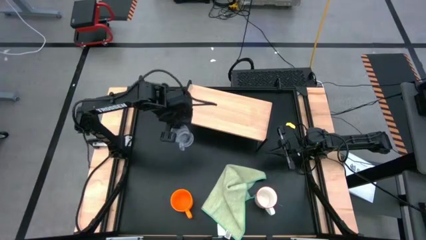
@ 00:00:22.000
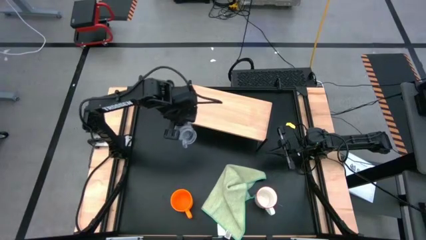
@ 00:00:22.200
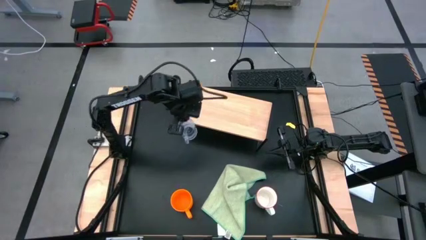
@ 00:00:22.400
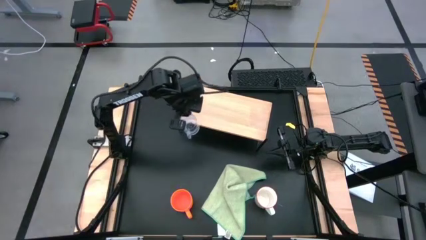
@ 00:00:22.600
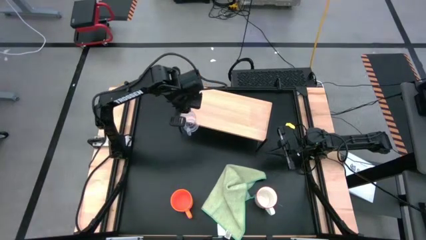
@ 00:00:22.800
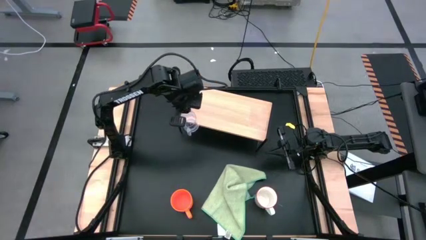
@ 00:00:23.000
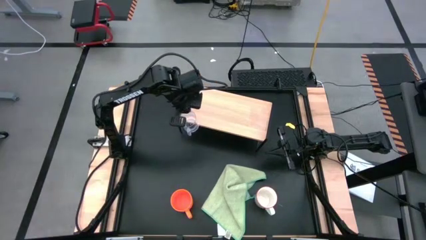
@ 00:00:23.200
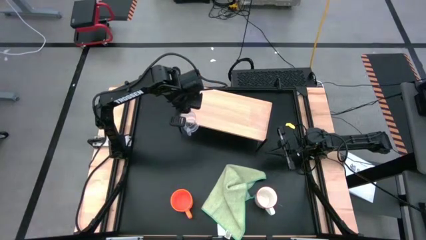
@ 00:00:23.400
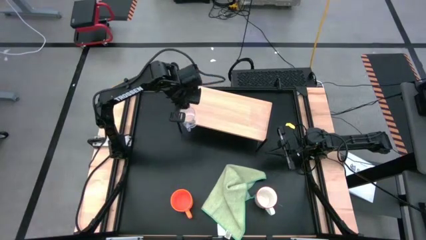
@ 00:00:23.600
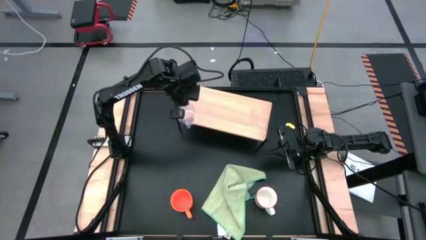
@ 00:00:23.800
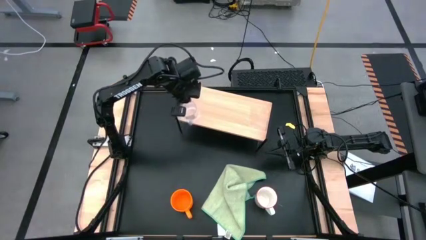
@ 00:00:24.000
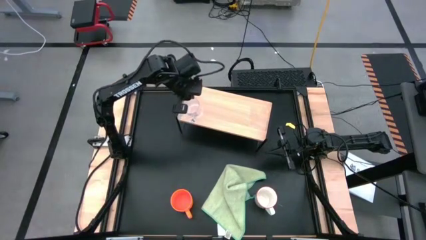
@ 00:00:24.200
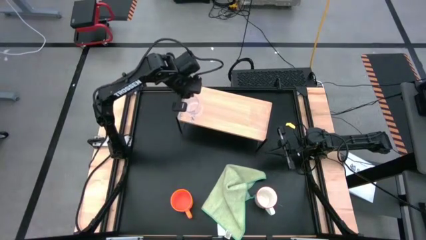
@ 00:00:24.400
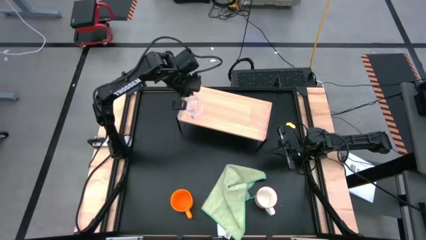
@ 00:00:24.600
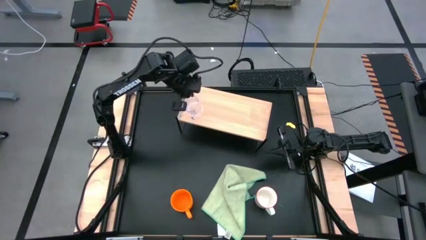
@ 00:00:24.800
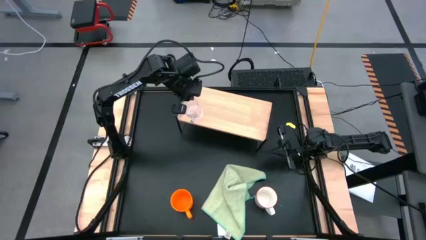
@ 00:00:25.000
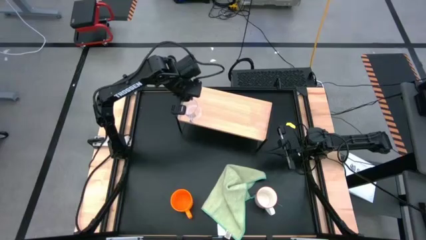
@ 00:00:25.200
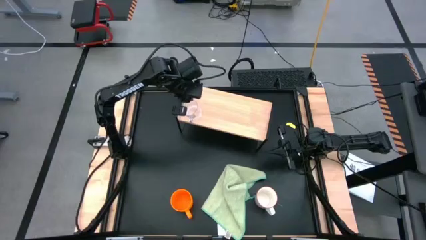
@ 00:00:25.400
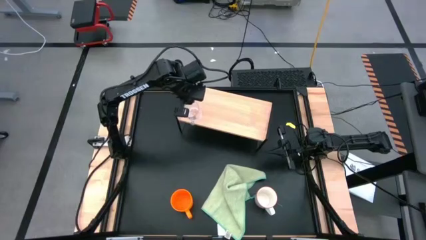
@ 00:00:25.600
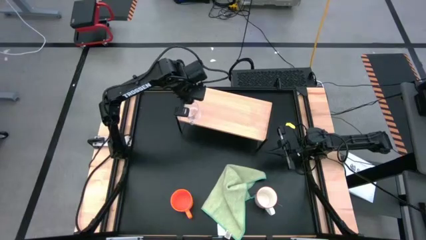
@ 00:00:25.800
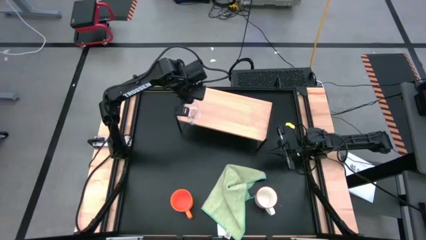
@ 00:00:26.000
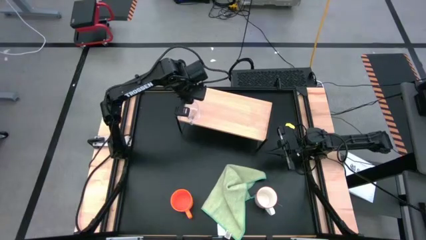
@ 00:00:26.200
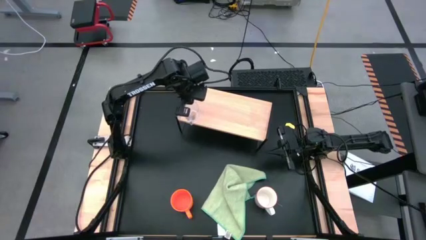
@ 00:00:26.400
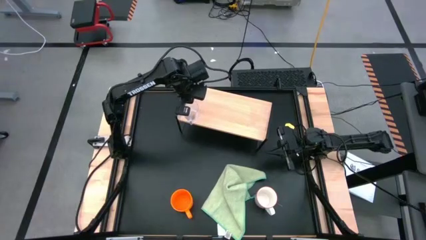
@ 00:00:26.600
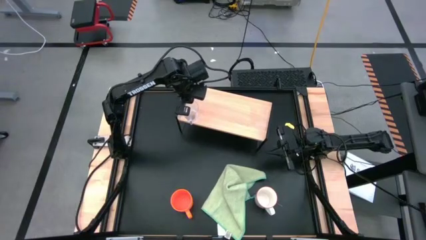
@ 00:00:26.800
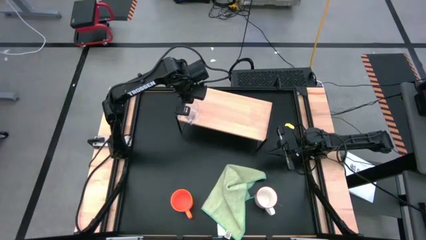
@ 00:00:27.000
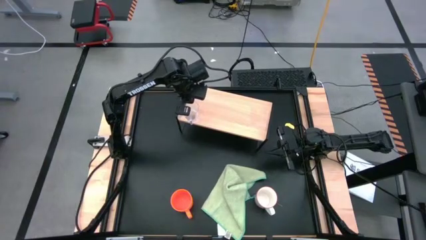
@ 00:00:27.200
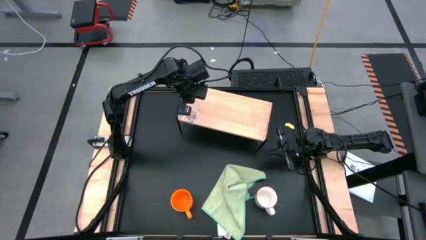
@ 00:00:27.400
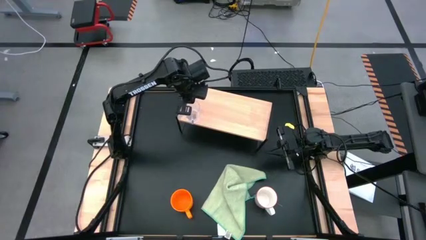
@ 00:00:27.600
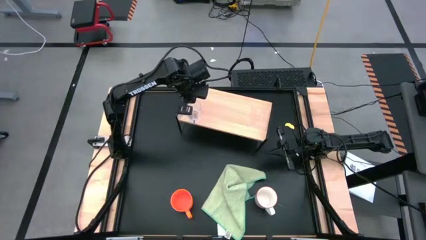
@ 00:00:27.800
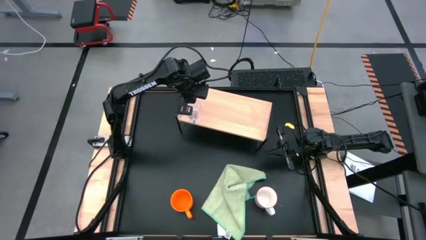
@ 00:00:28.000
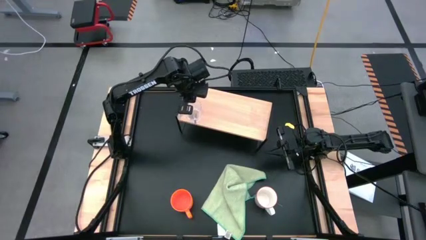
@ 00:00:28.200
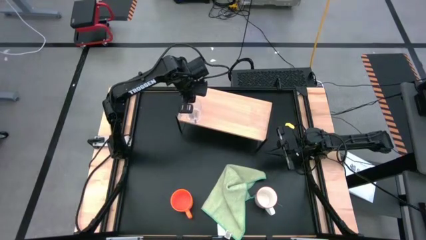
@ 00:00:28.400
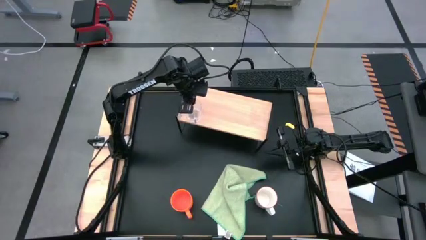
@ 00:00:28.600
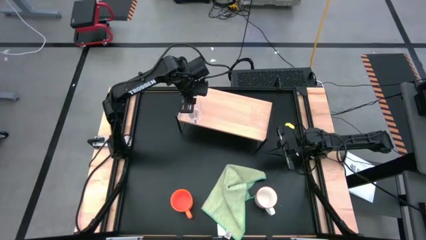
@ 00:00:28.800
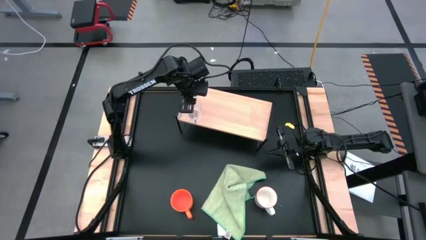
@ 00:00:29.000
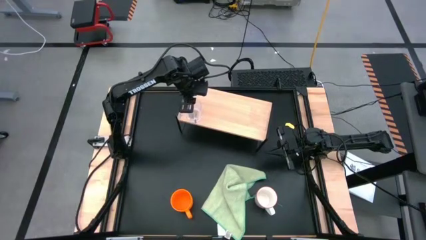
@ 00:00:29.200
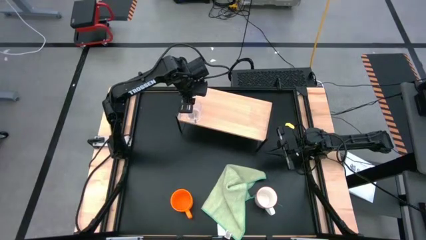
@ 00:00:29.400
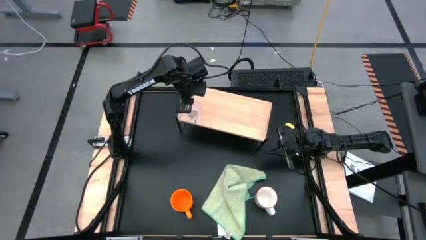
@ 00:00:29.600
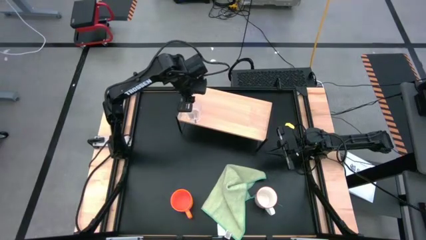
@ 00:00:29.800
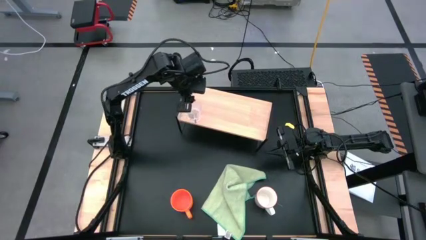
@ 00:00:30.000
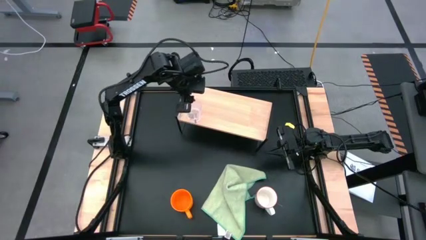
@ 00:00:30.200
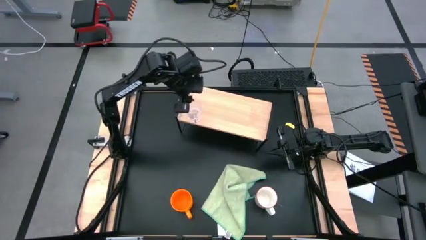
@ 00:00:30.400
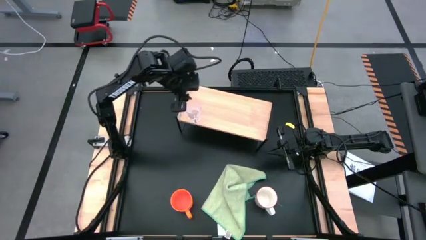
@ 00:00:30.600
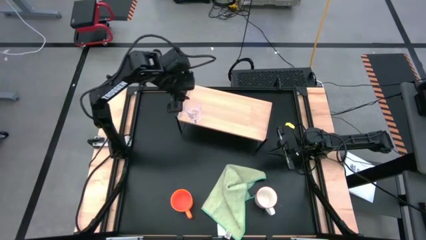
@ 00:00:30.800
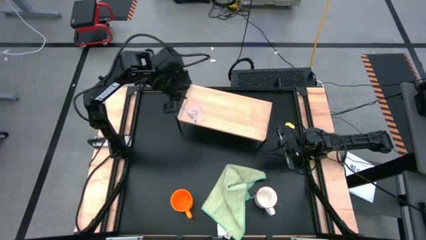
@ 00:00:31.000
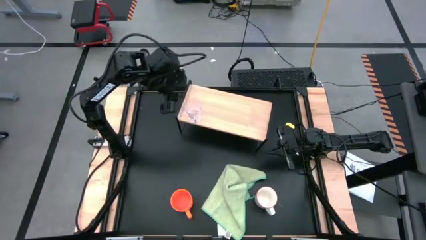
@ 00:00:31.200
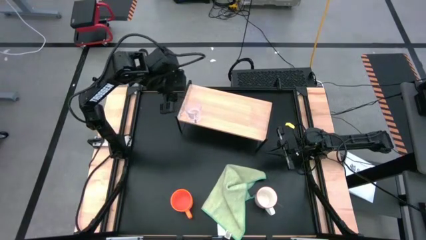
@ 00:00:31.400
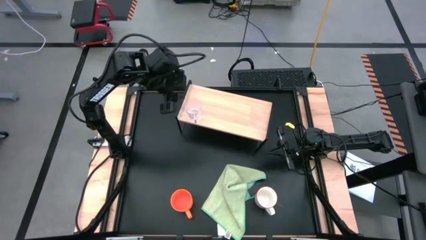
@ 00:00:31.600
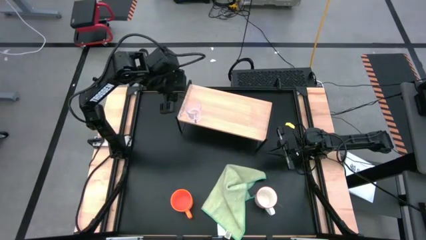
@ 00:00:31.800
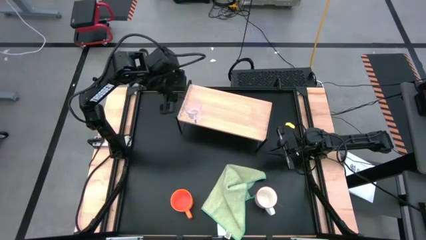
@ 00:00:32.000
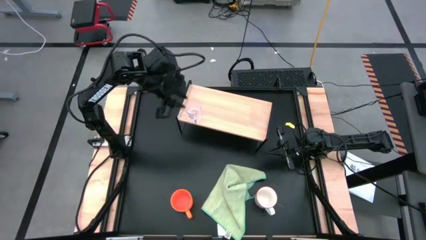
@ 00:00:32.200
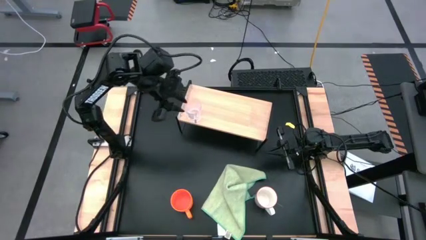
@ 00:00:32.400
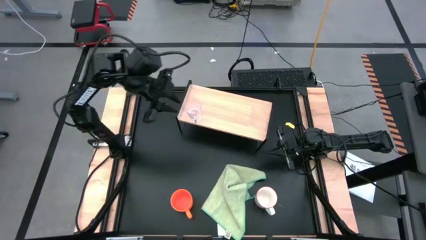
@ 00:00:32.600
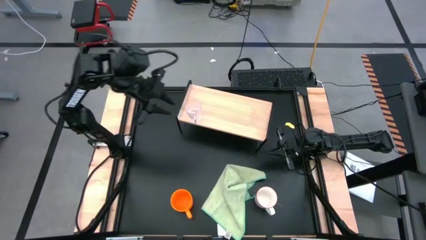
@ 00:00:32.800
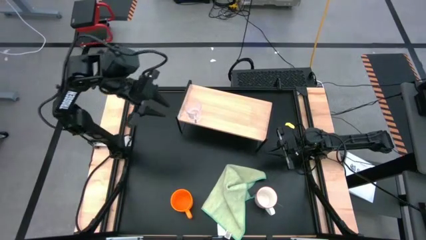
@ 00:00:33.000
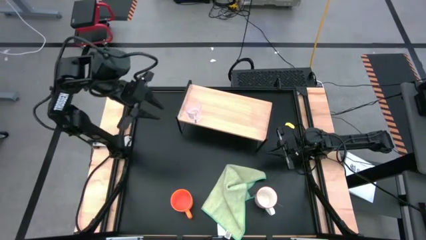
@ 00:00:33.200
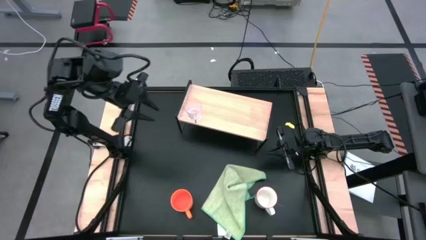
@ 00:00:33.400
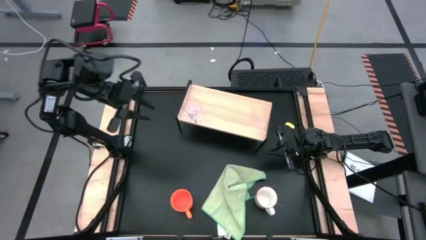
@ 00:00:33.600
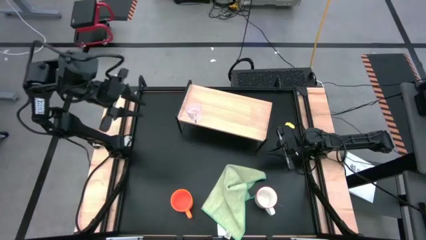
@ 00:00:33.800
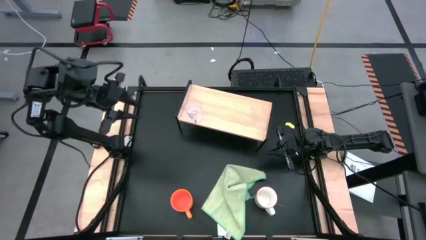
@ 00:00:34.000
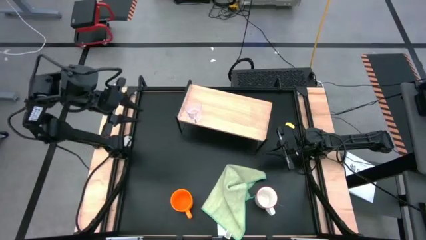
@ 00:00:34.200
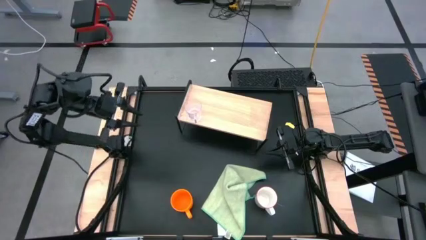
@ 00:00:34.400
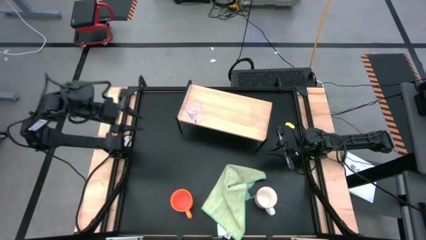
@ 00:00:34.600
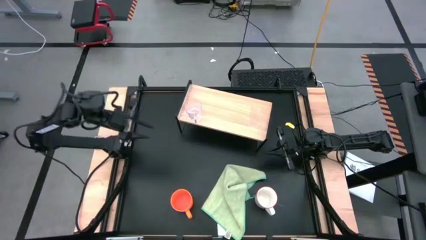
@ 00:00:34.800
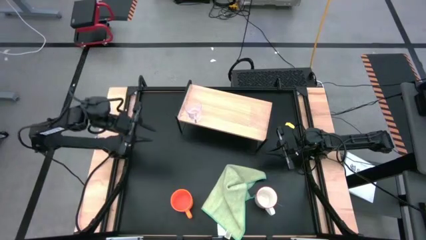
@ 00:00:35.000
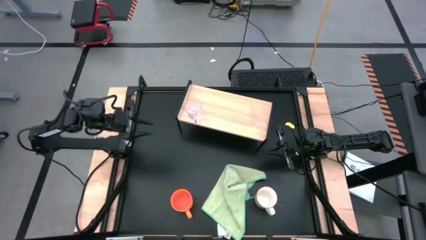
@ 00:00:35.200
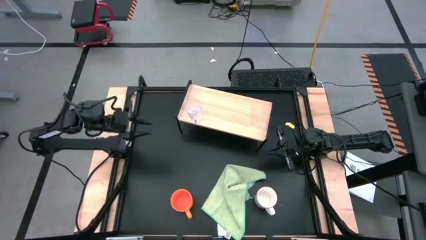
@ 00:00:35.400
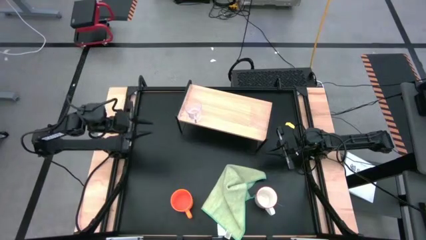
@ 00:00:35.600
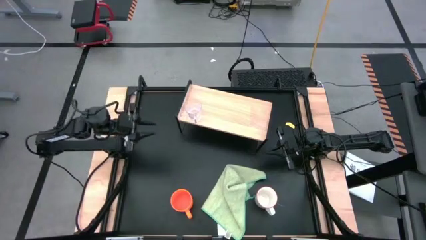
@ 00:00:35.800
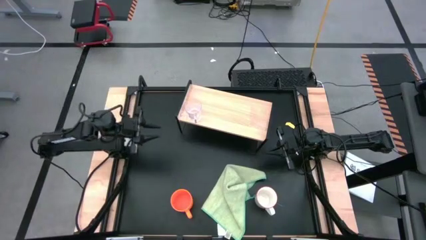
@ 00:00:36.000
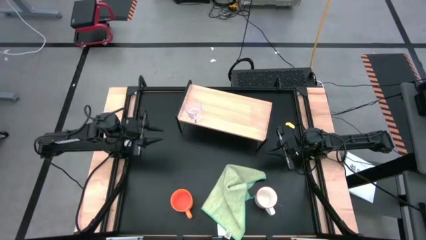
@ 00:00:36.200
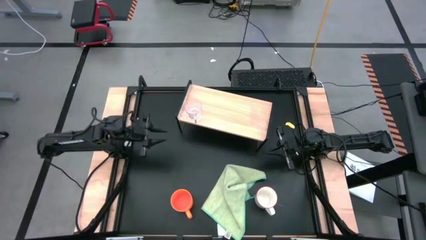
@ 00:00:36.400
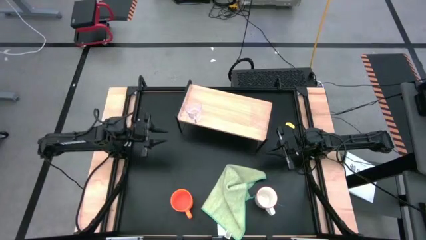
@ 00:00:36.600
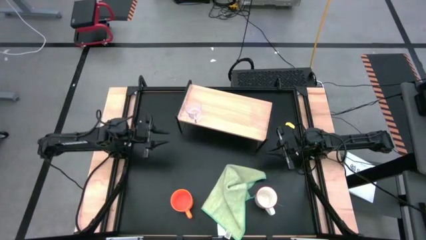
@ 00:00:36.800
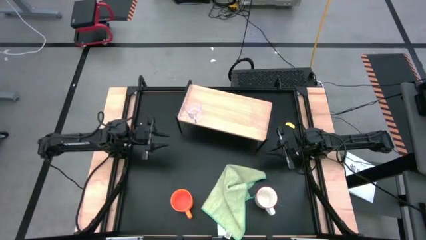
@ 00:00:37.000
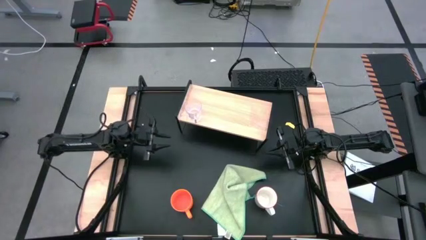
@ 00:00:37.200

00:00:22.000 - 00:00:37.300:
Task: Stack small to large cups/mugs on shelf
Put the transparent mug on the shelf
